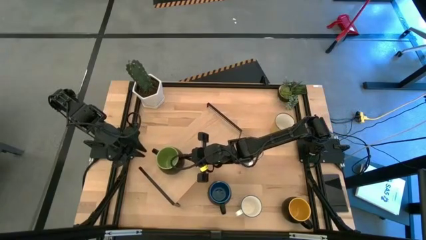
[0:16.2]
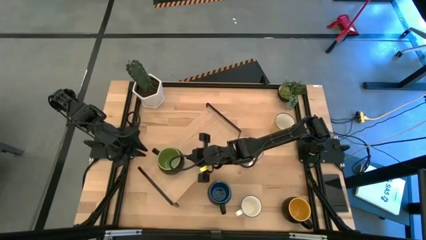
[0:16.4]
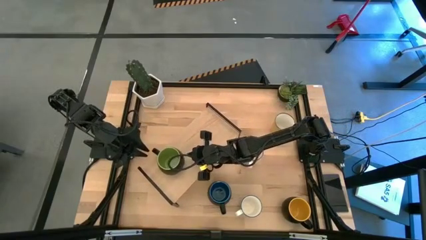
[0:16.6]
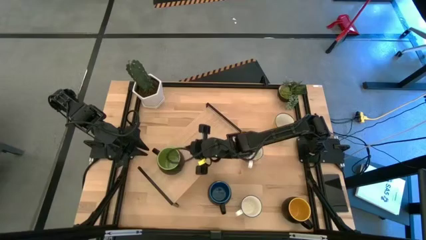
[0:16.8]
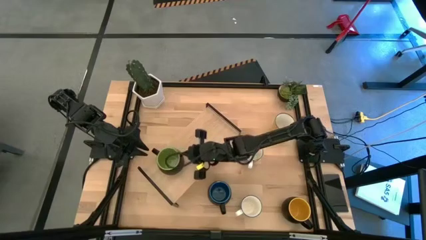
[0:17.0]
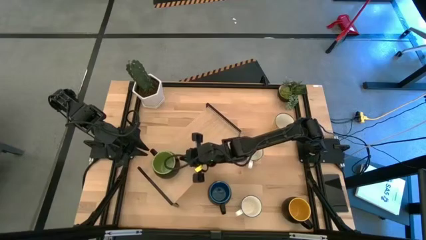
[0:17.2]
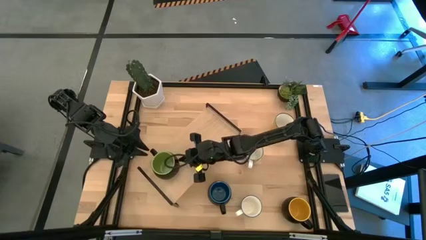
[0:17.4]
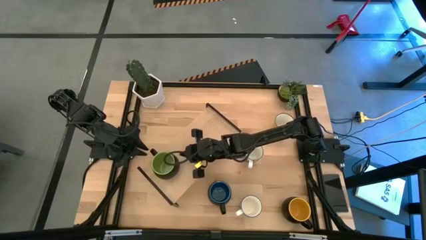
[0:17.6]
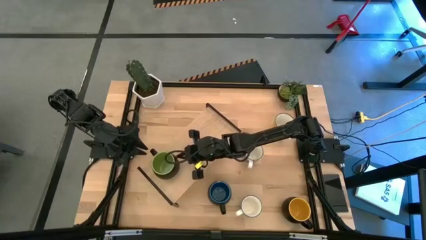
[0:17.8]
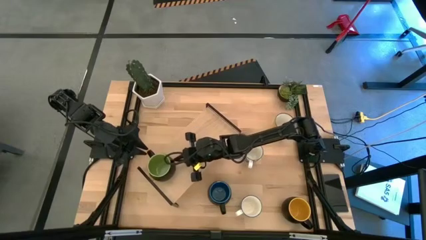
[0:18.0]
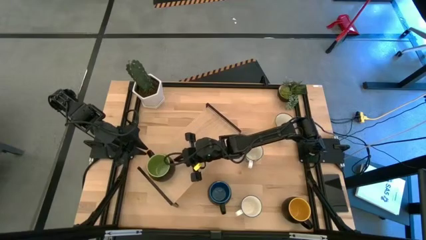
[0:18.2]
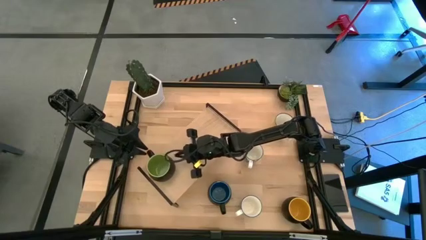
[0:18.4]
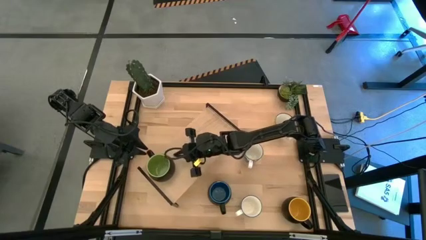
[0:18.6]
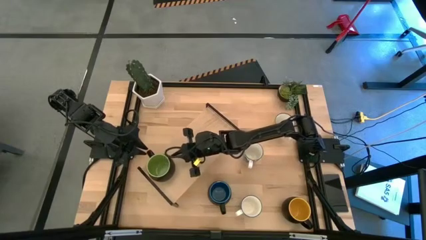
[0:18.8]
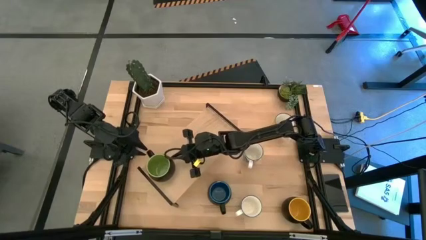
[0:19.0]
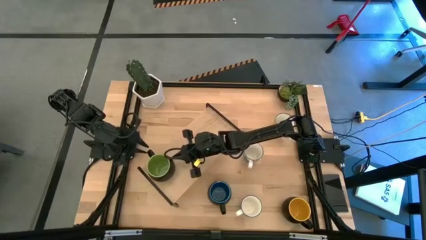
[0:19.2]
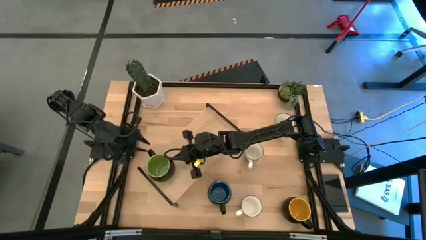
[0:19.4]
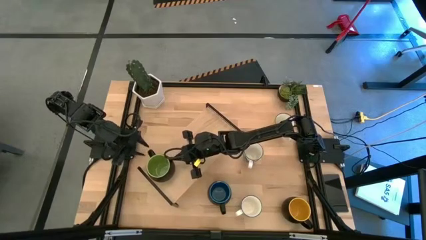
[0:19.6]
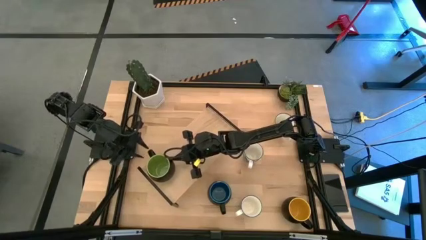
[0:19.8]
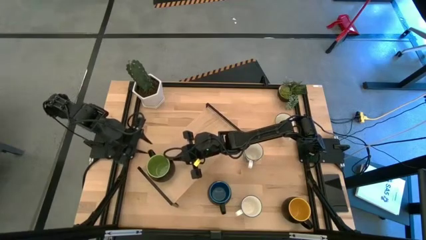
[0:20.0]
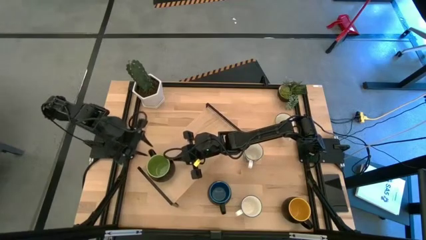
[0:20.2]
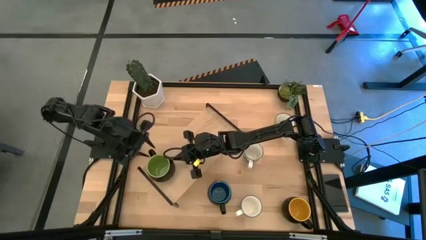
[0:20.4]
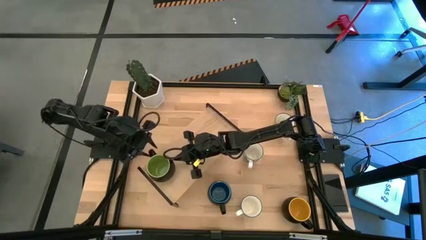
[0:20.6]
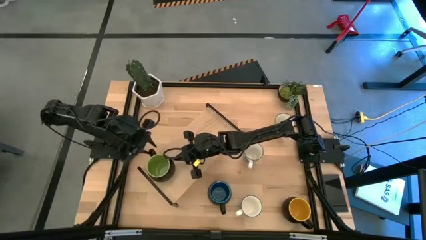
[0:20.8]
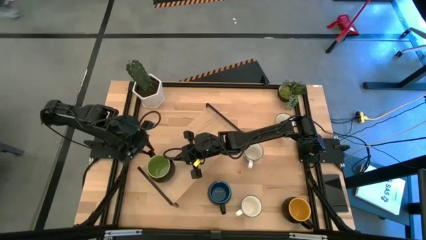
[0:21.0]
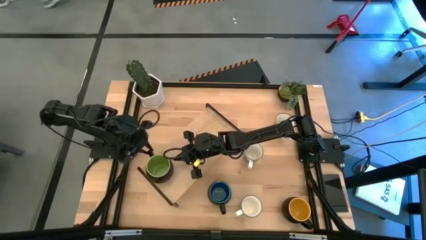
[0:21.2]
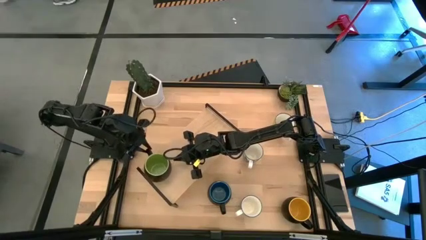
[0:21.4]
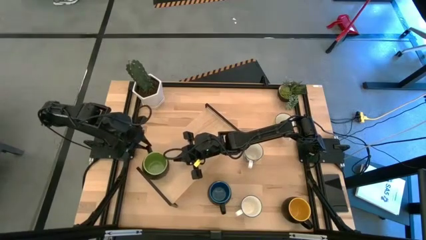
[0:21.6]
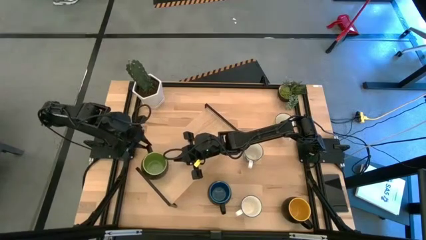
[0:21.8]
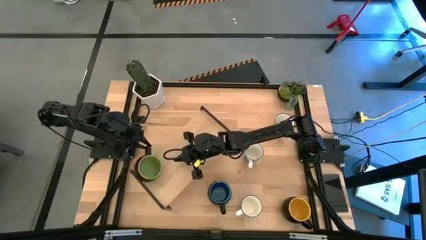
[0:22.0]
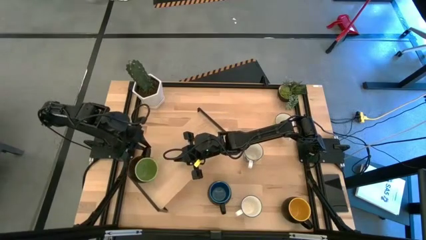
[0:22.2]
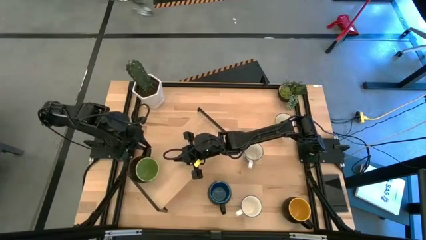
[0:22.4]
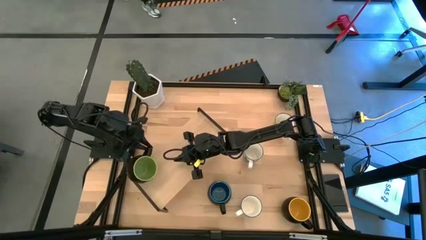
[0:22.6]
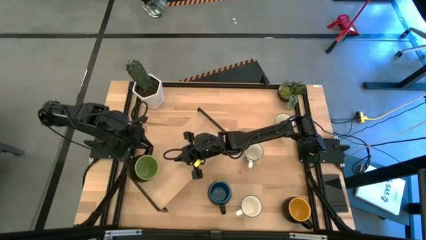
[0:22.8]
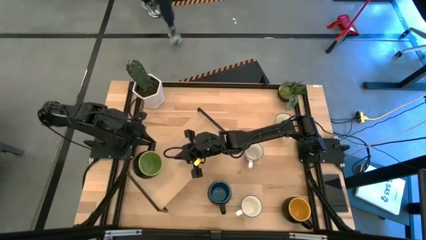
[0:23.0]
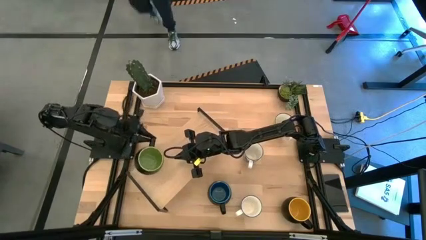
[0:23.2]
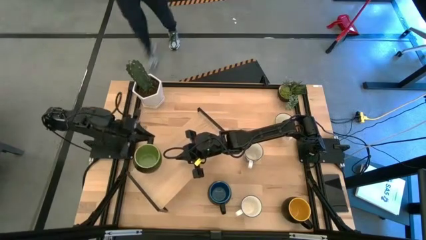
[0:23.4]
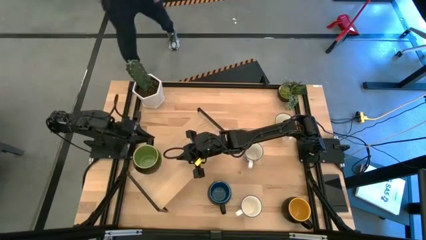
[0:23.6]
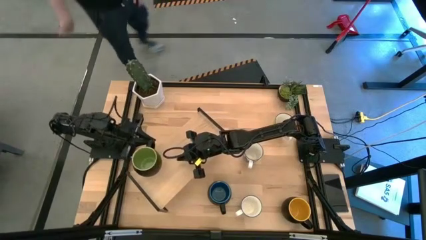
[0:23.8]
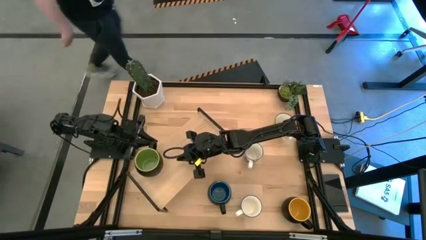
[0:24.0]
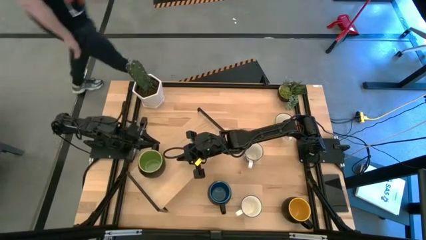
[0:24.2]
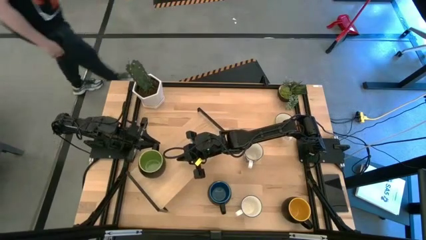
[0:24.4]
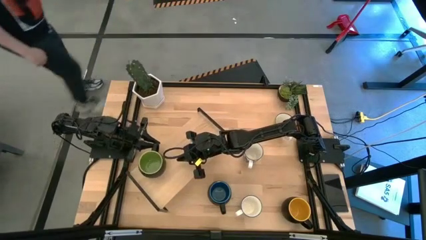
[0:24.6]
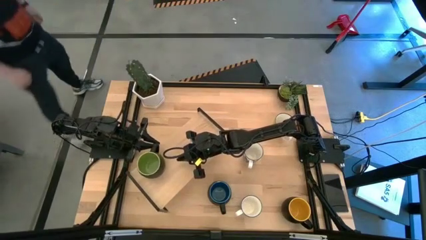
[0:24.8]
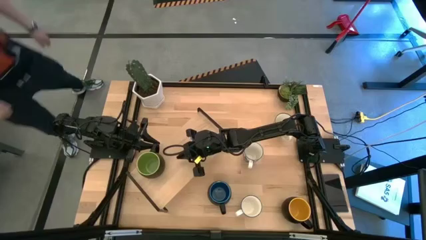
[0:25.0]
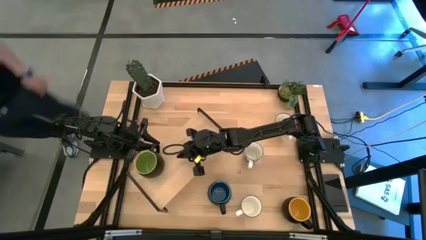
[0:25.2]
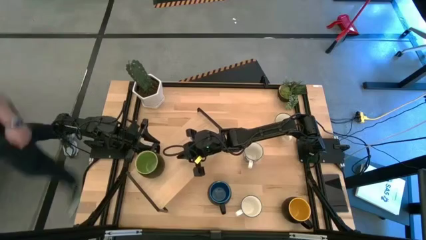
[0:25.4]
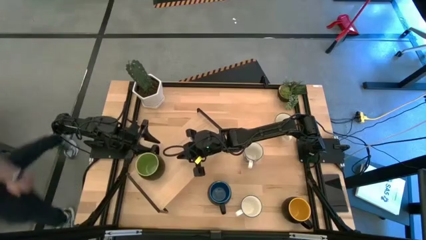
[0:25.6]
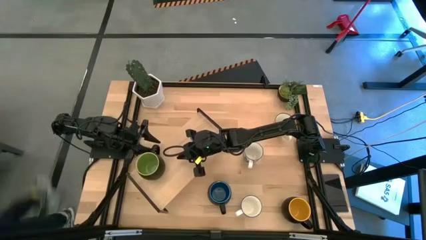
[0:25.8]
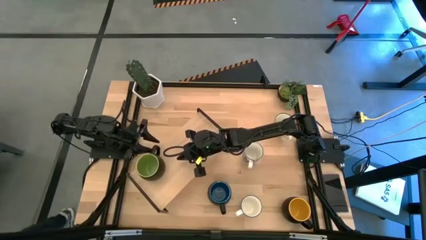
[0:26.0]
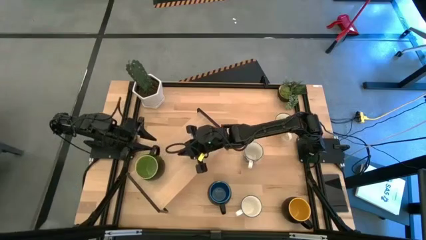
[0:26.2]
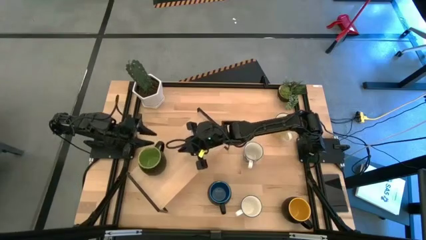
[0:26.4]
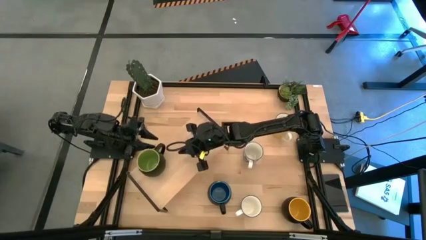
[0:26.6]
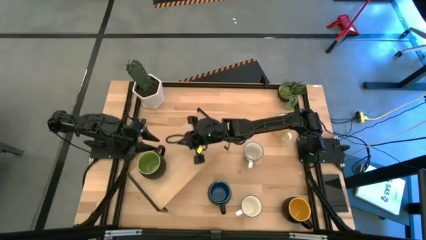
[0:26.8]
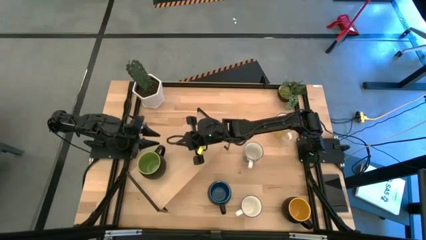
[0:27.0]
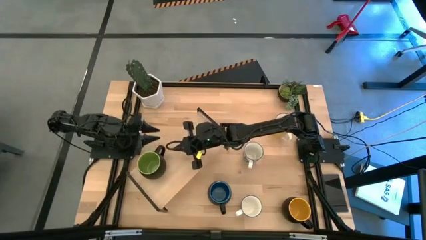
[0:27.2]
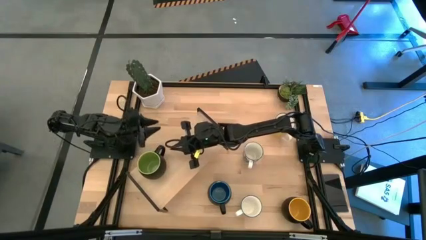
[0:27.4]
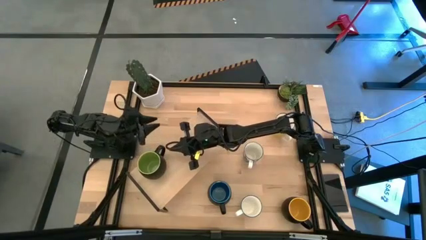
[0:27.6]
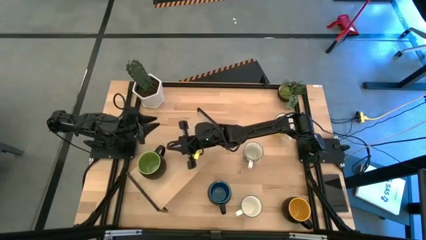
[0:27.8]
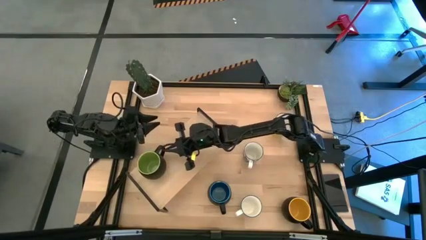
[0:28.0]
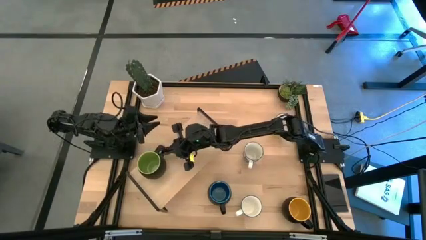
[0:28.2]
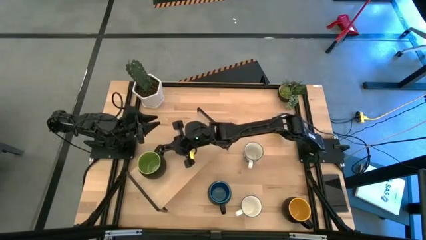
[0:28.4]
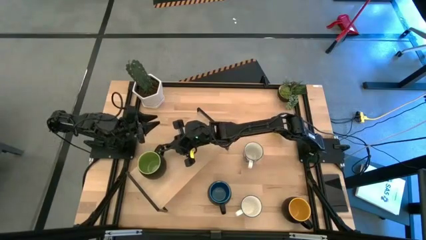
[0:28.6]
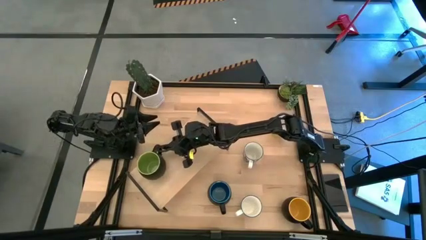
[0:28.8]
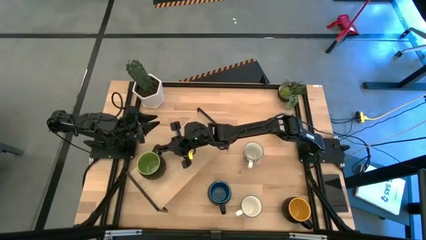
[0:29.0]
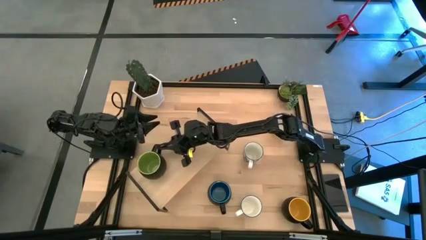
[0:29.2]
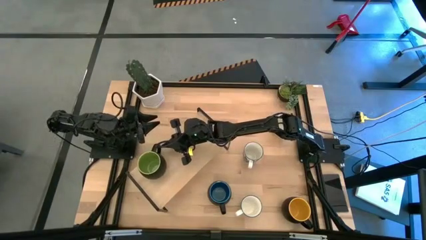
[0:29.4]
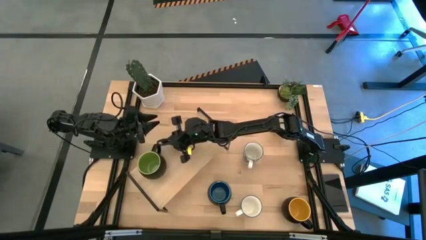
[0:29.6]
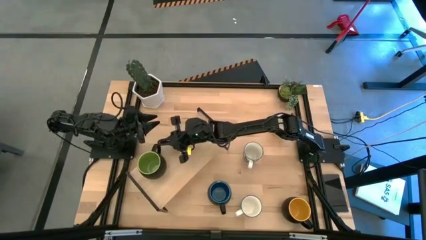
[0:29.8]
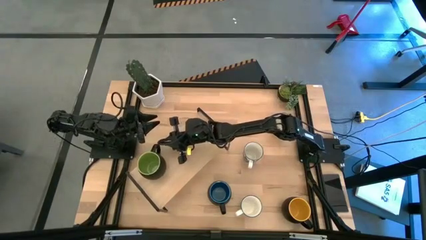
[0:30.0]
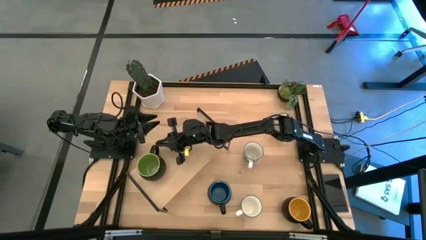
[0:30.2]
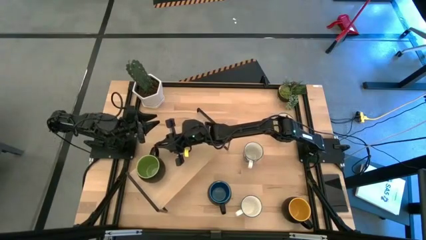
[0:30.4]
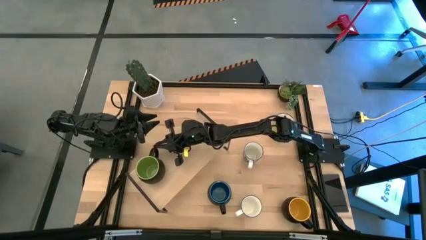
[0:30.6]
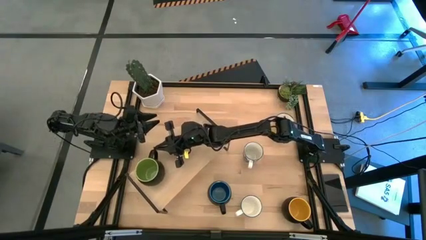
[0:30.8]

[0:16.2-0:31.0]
Task: Place coffee mugs
Put the green black mug on the shelf
